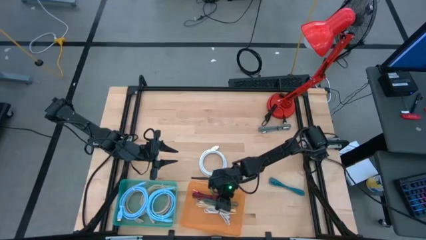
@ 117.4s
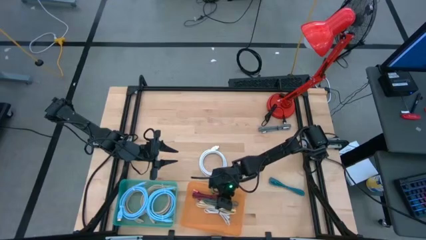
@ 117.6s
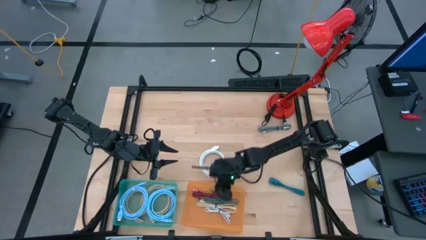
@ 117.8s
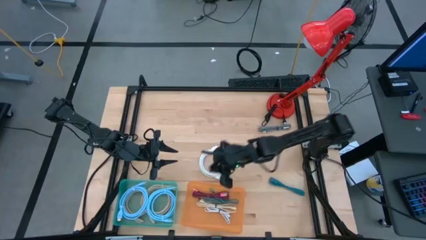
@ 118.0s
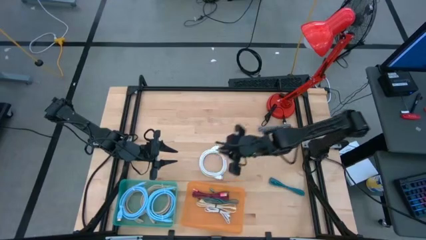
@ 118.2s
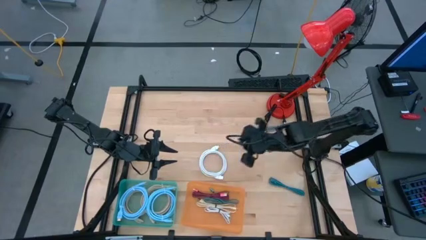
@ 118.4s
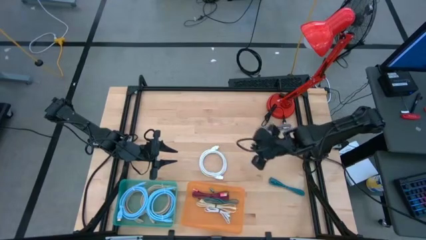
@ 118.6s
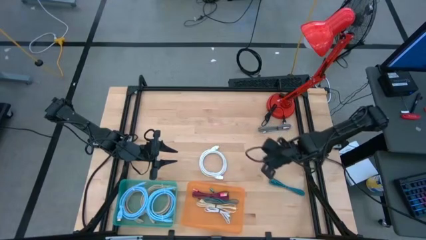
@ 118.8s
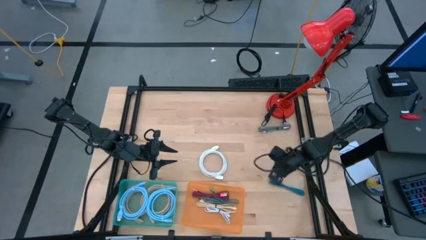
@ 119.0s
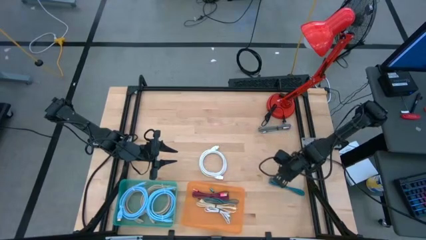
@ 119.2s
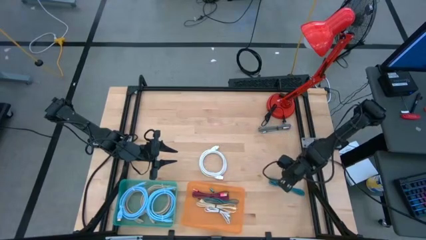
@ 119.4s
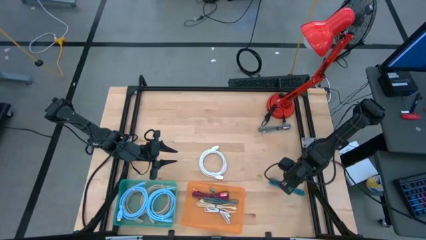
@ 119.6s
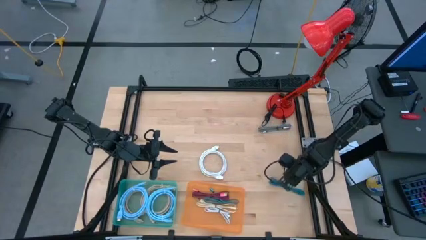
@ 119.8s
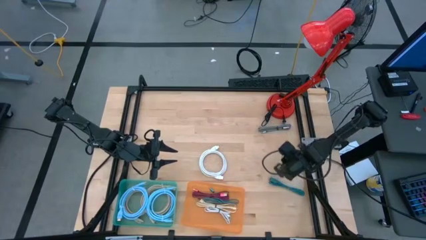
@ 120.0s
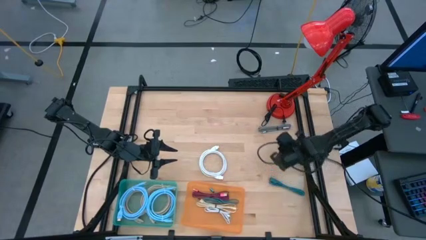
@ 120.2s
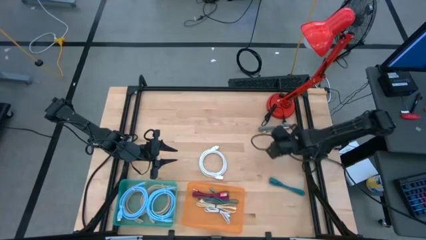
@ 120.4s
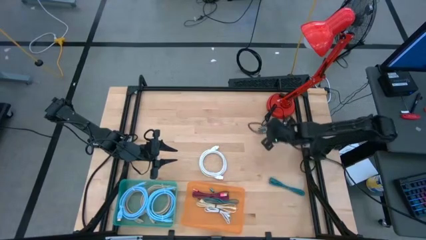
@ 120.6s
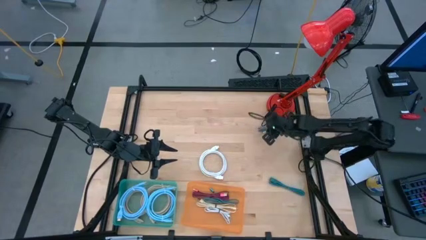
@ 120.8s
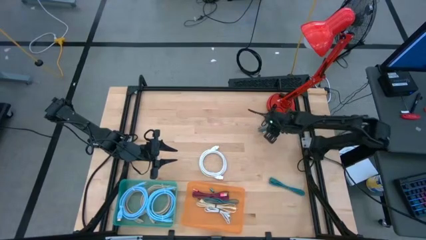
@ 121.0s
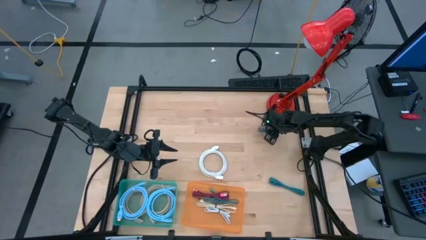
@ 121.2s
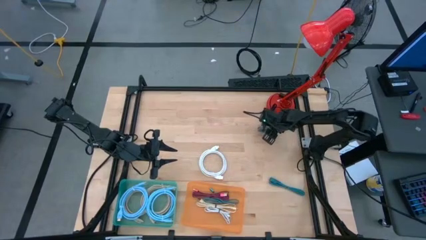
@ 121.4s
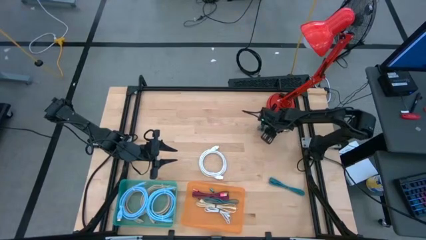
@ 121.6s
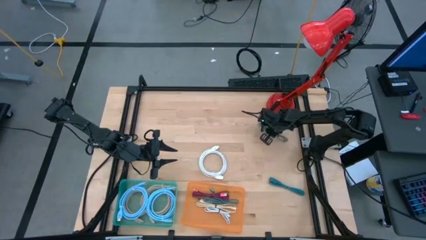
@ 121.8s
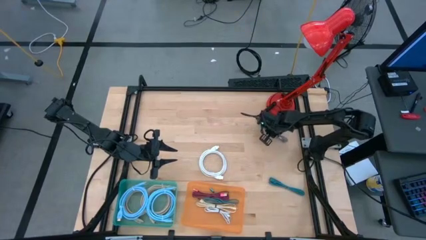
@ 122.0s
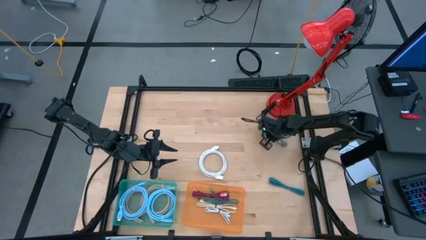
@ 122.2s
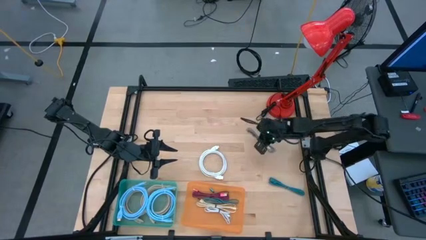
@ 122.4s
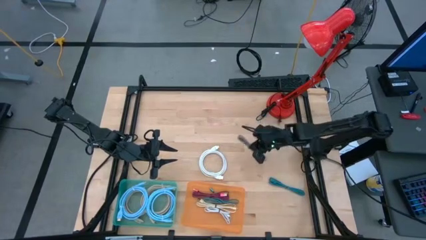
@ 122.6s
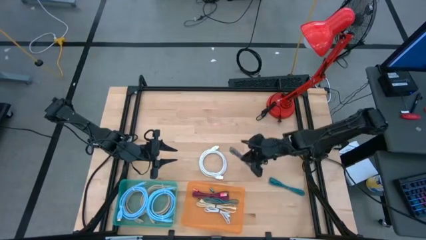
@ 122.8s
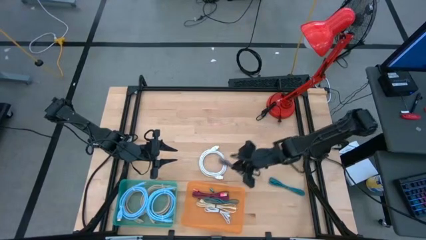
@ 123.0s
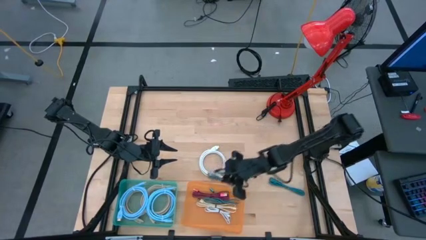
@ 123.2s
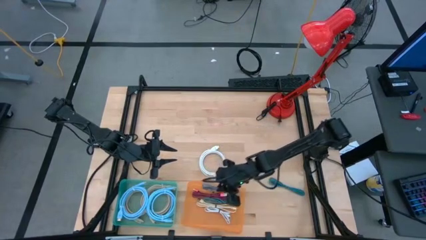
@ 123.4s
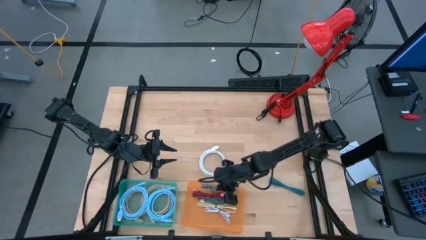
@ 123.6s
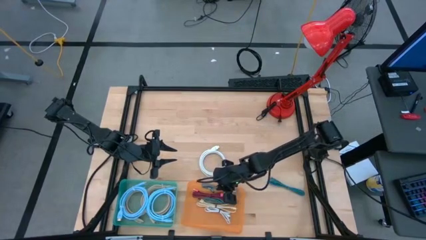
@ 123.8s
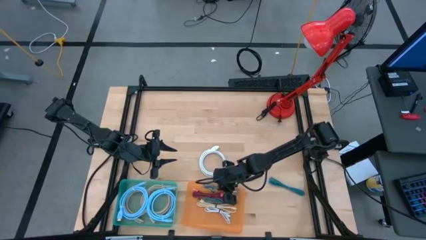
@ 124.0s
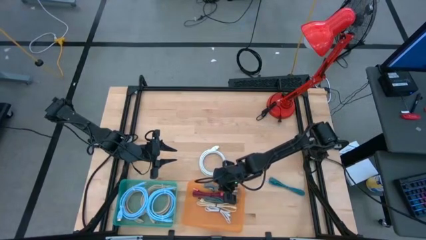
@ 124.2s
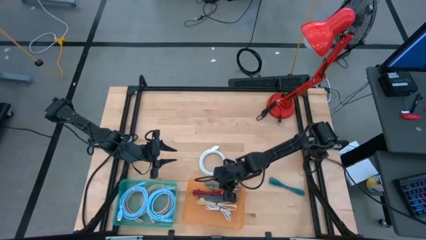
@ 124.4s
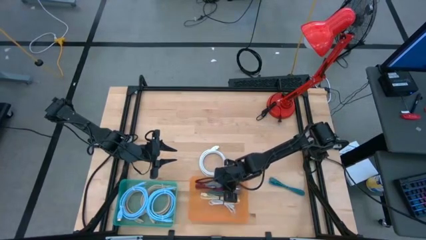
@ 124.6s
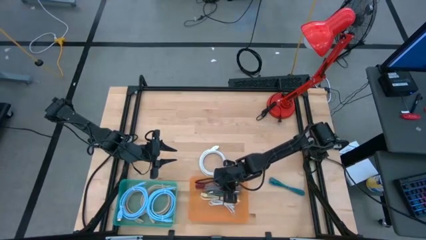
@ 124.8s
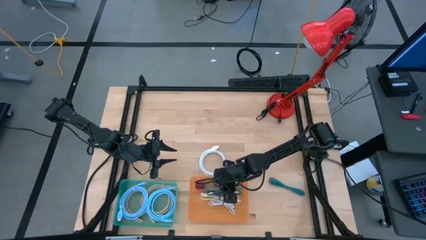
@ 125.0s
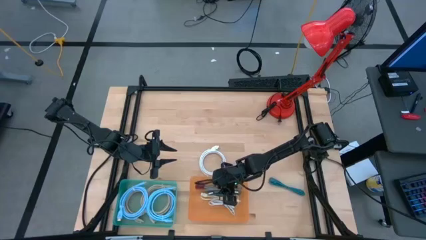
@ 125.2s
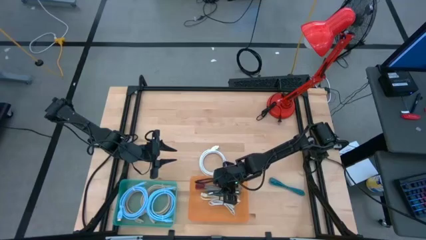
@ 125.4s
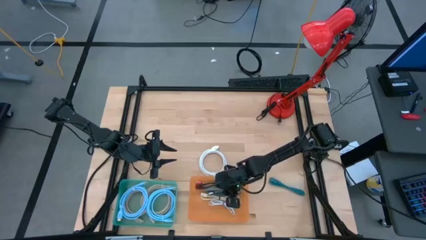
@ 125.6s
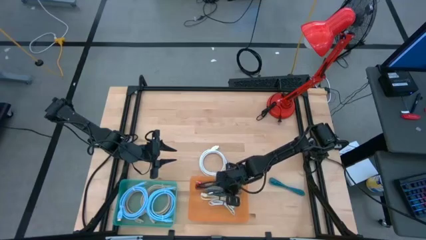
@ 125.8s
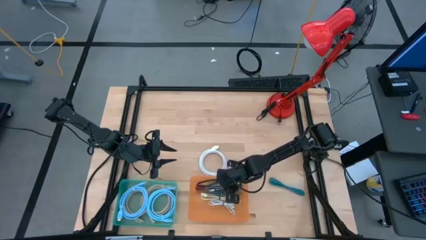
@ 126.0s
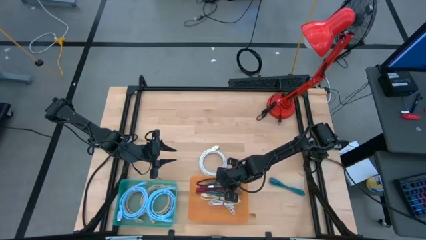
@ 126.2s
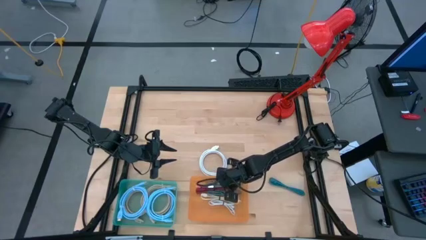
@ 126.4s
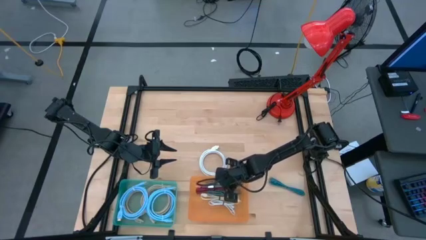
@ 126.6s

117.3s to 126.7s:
Task: Pick & Place USB Port
Put the black charger cable into the orange bin

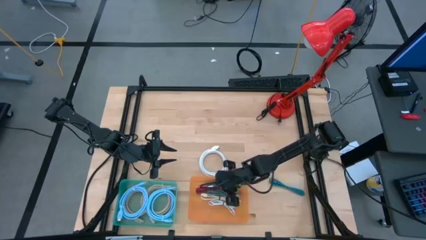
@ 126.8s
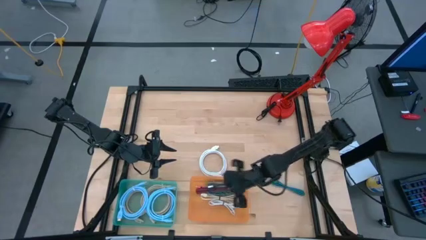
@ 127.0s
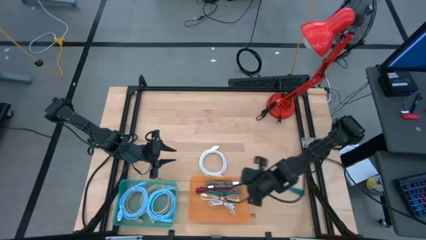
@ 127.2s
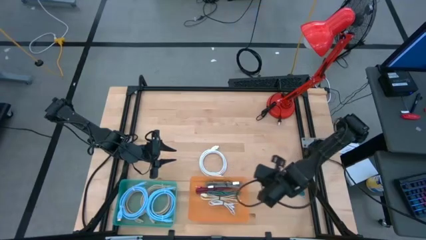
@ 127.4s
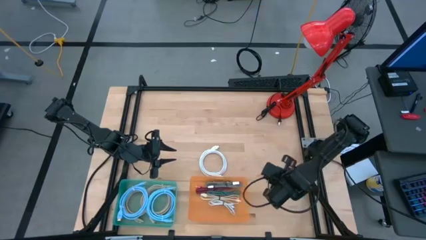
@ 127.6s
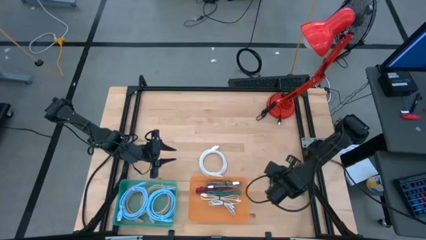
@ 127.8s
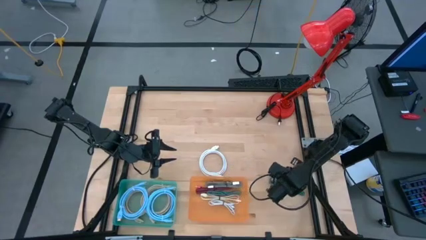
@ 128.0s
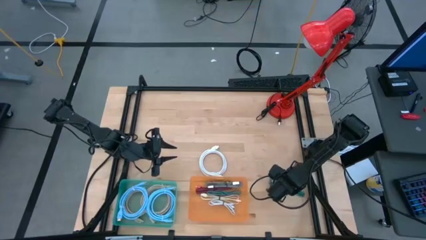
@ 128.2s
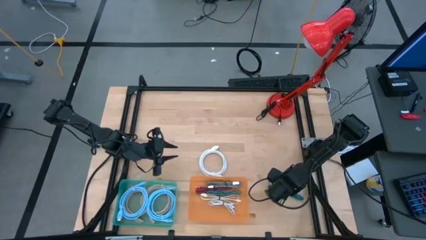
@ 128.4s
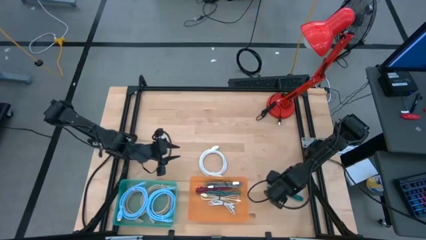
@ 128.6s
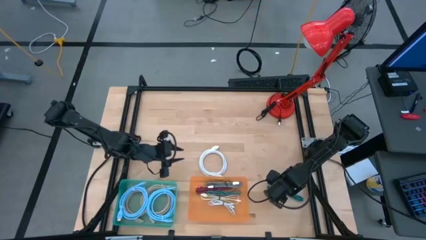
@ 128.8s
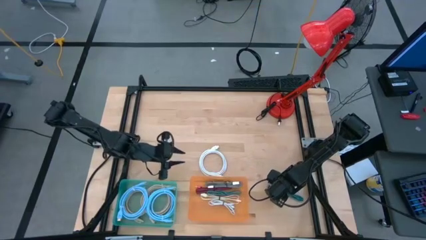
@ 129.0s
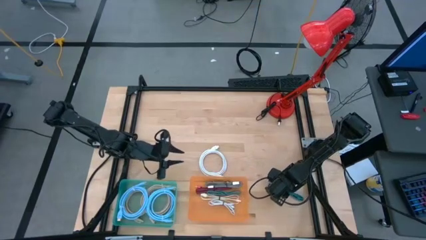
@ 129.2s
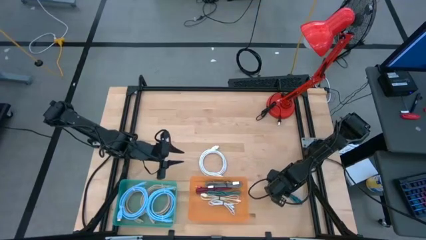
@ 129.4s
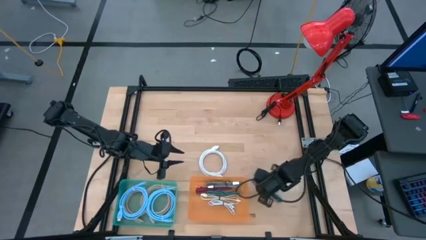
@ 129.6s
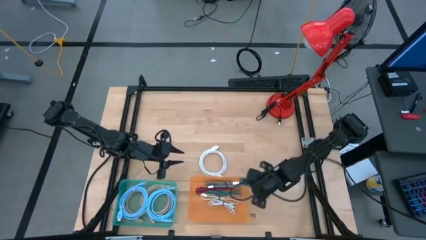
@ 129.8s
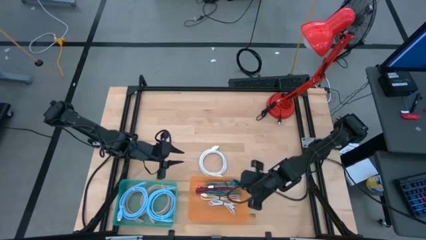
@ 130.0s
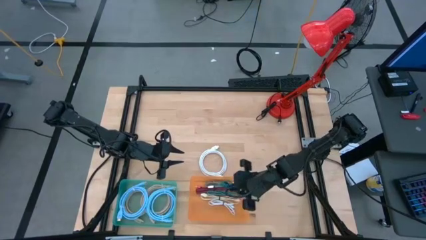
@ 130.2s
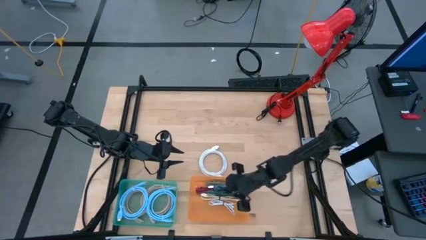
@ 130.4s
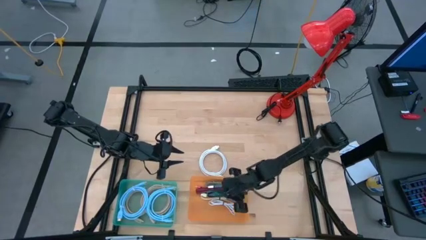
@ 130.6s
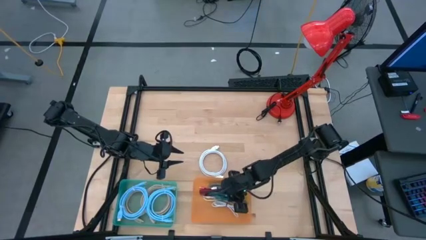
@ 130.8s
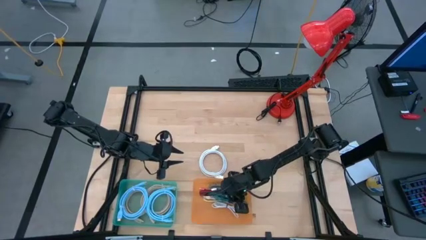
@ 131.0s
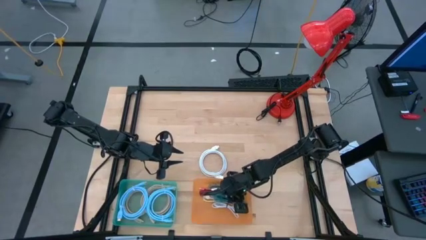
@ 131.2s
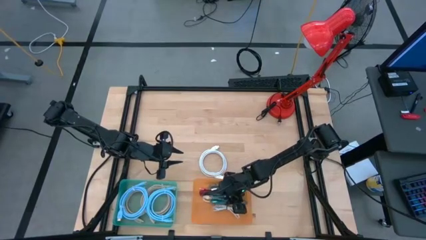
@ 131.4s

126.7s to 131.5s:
Put the blue charger cable into the orange bin

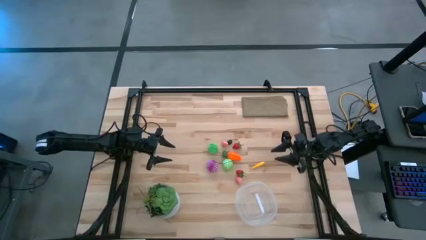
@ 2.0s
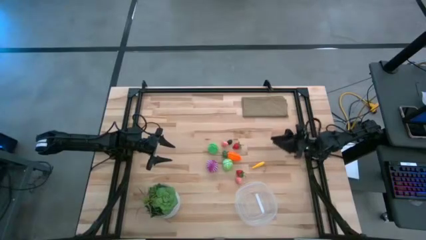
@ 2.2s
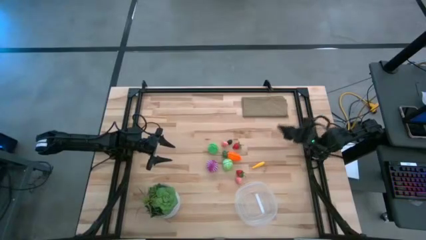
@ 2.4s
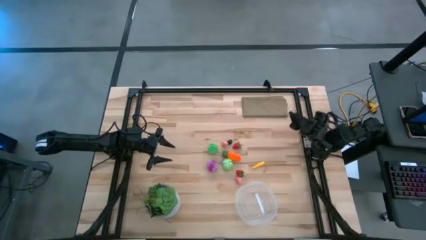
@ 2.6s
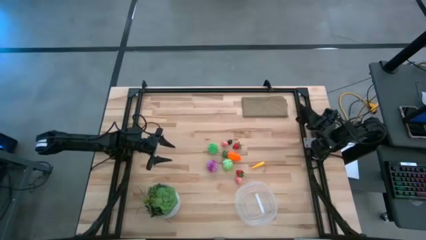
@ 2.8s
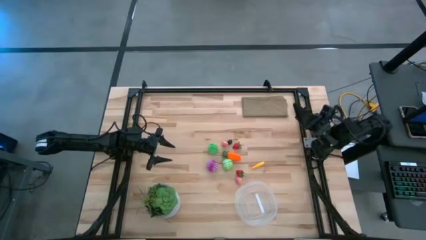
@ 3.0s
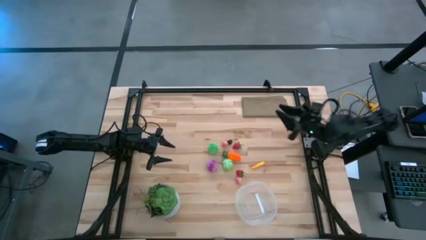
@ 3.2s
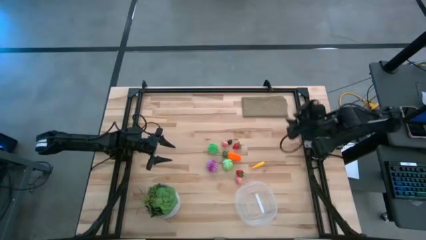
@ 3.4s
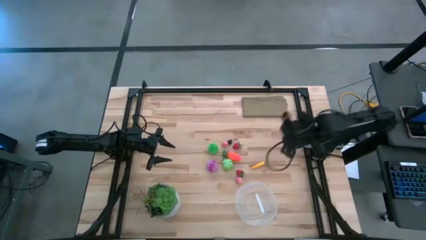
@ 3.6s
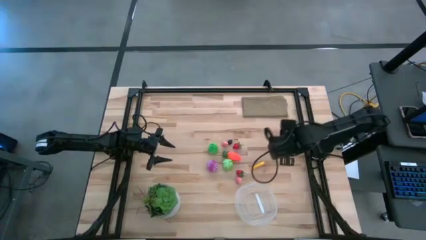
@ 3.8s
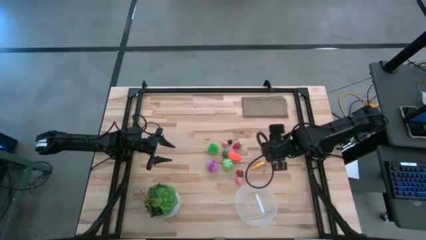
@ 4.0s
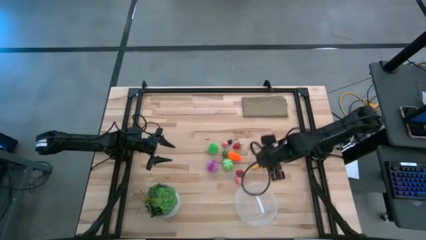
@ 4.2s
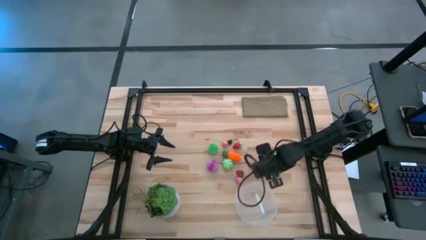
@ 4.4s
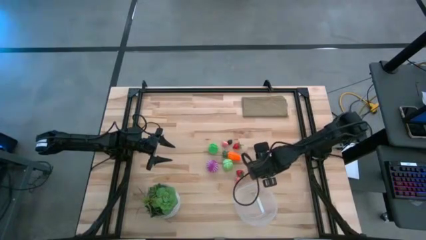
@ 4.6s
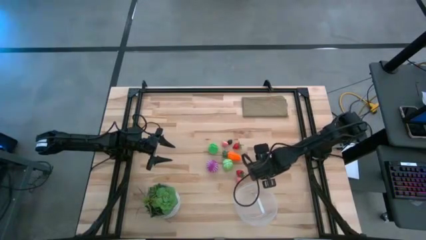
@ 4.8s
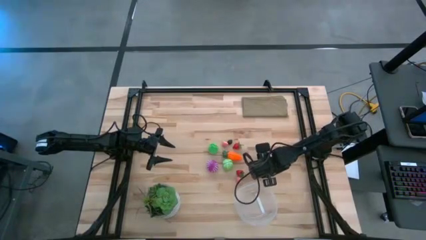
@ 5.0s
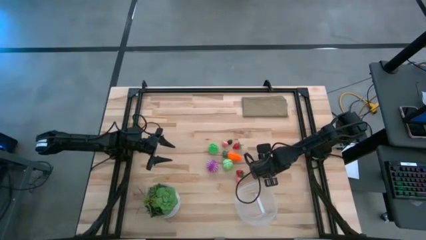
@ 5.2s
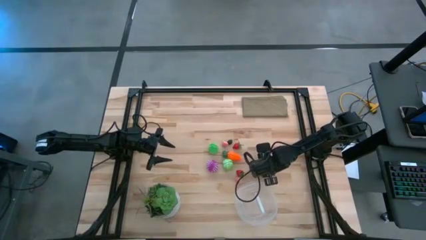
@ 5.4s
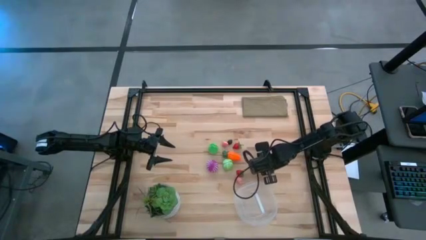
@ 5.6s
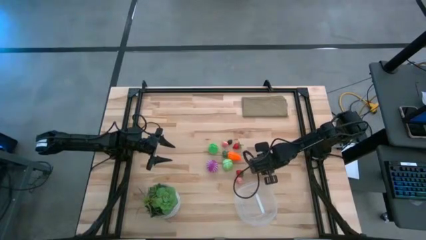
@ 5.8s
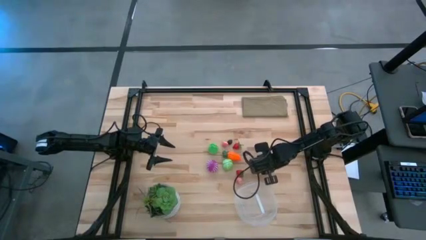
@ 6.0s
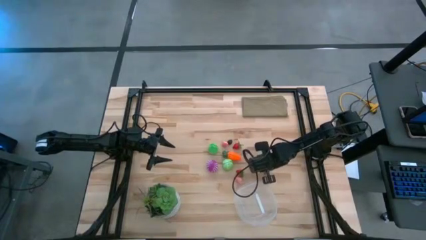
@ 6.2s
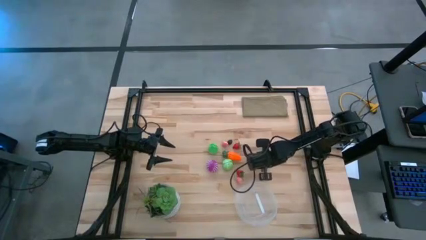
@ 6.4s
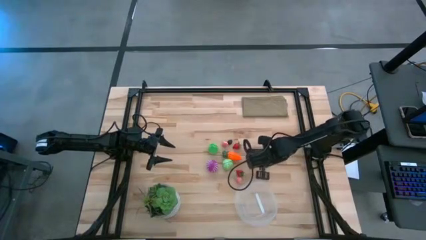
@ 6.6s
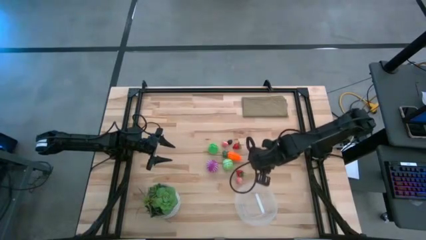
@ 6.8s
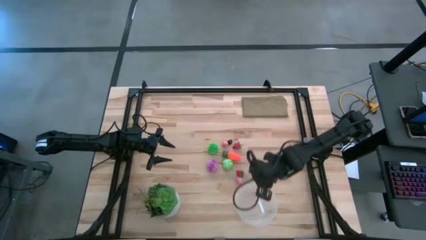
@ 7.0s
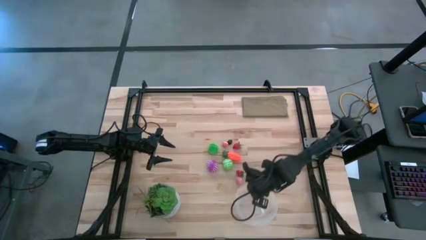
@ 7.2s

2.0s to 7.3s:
Task: Pick and placing Produce into tupperware
Put the yellow corn into the transparent container
